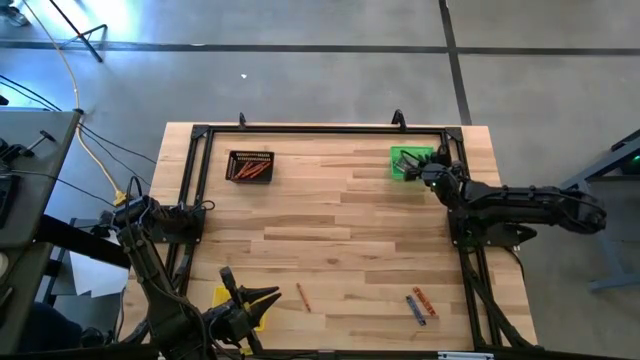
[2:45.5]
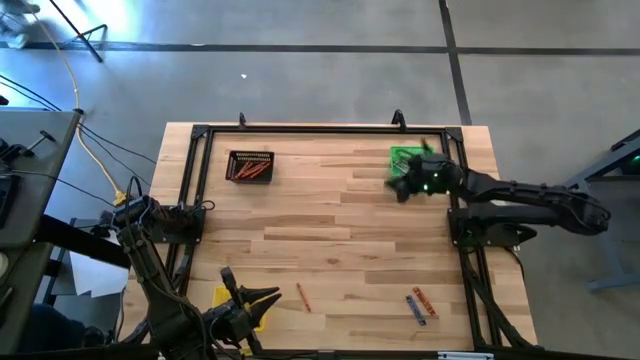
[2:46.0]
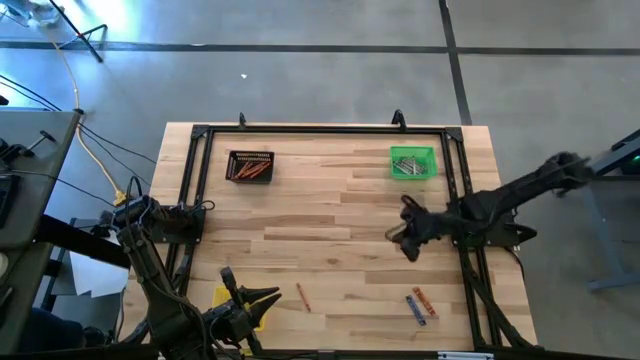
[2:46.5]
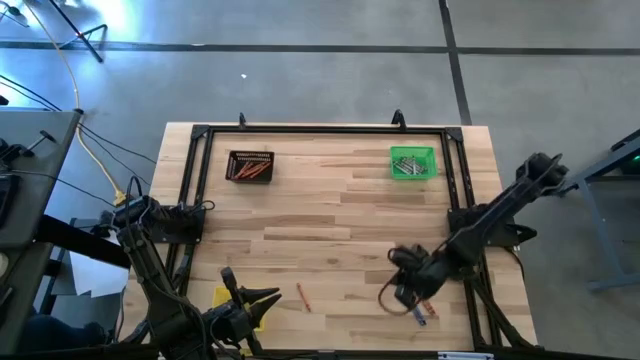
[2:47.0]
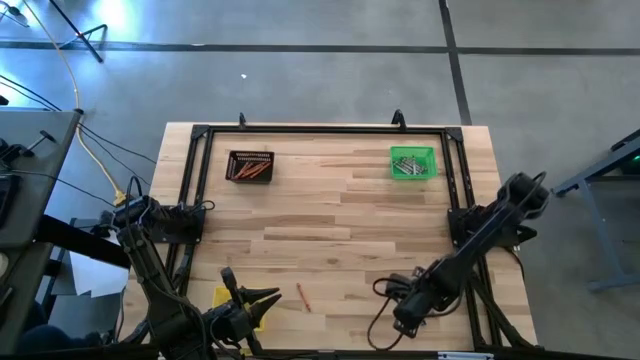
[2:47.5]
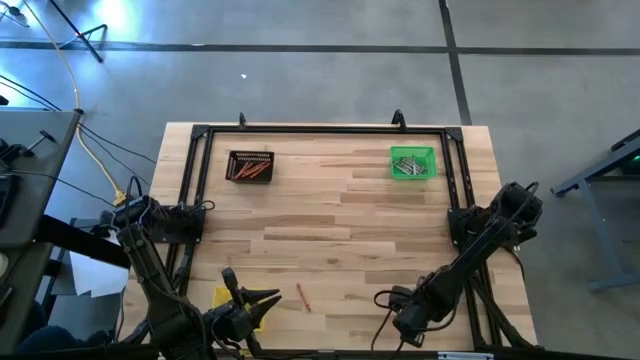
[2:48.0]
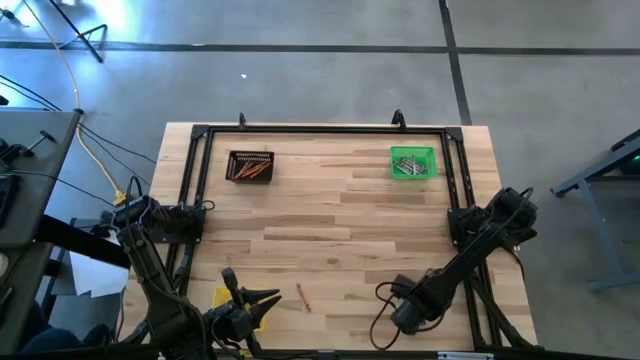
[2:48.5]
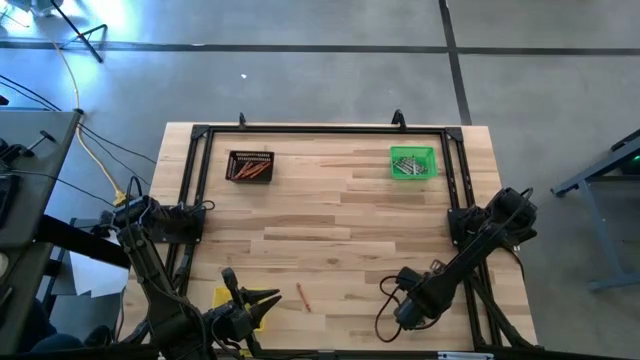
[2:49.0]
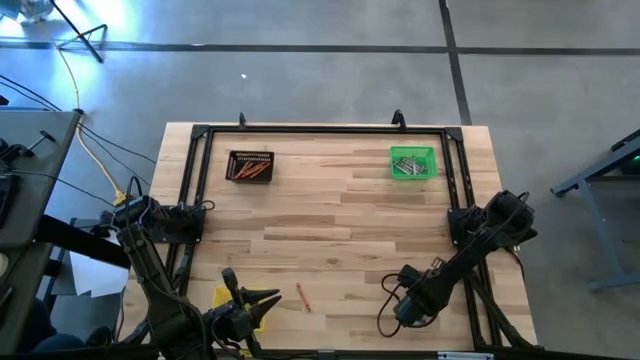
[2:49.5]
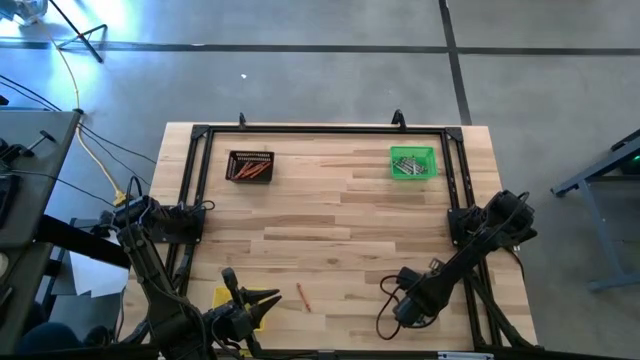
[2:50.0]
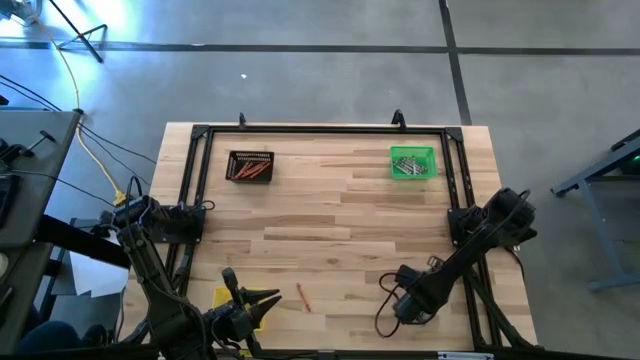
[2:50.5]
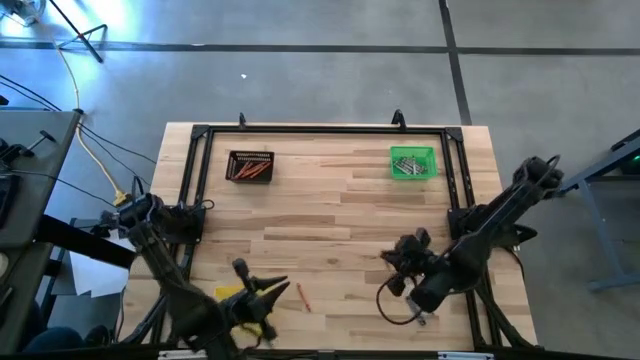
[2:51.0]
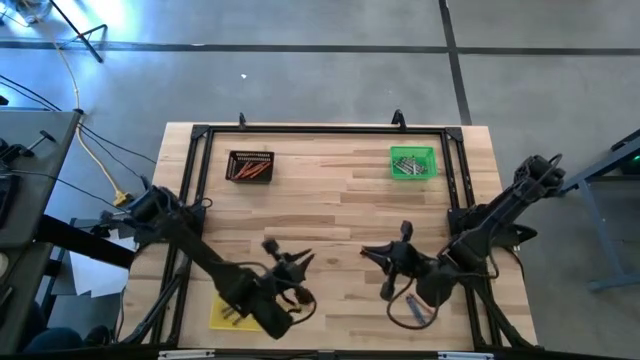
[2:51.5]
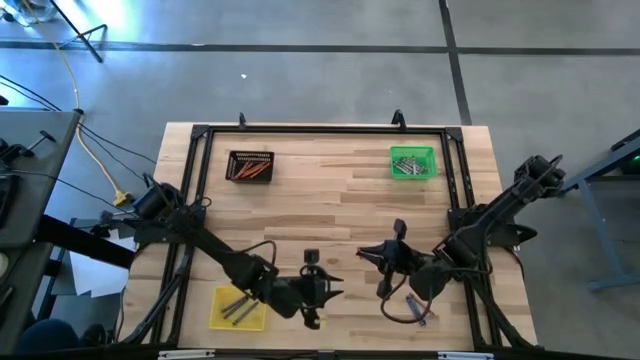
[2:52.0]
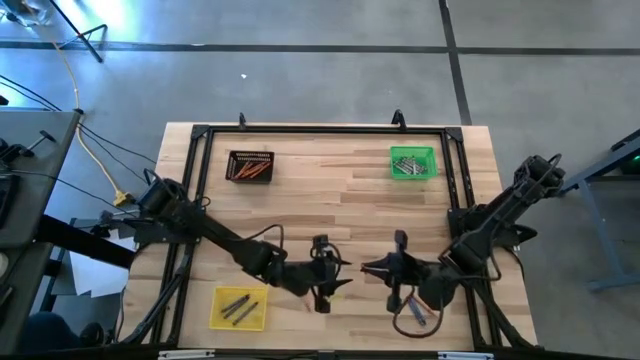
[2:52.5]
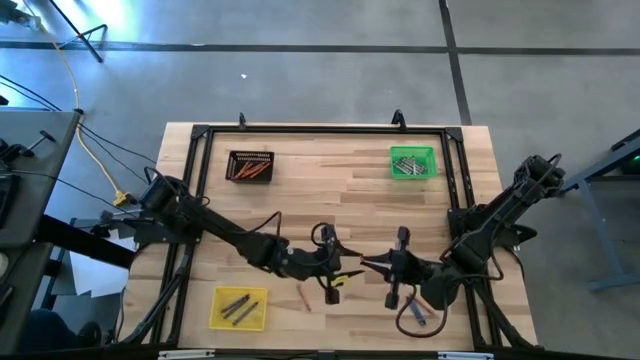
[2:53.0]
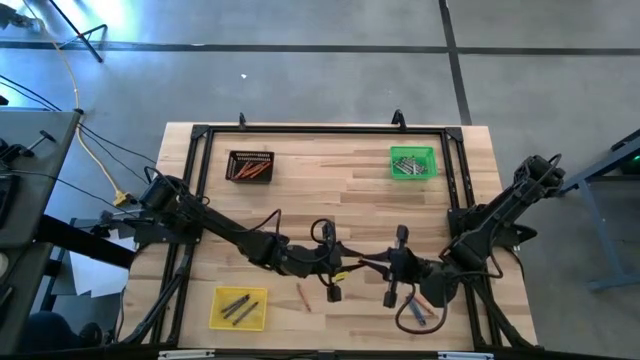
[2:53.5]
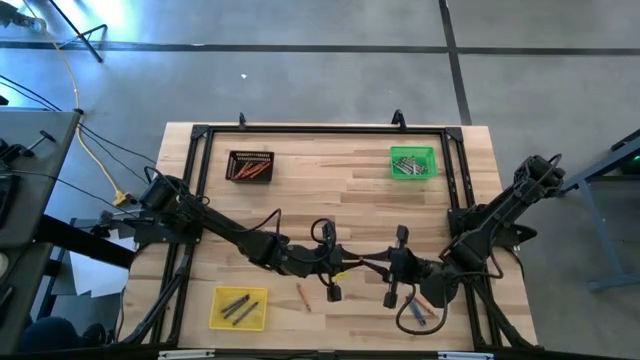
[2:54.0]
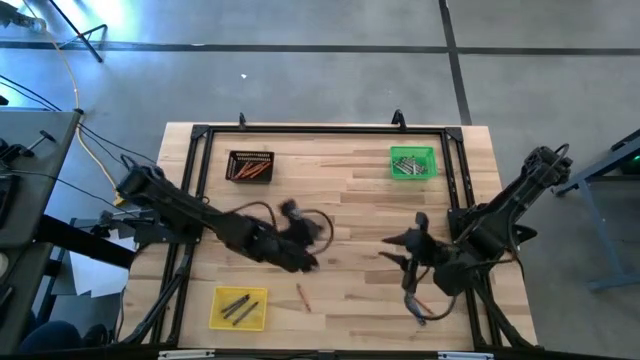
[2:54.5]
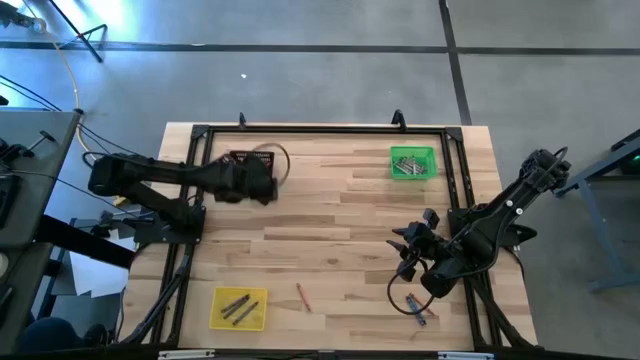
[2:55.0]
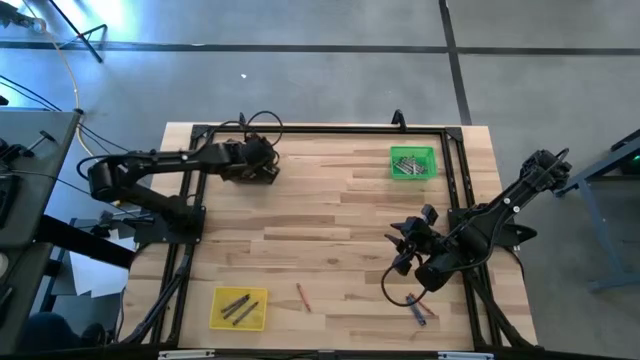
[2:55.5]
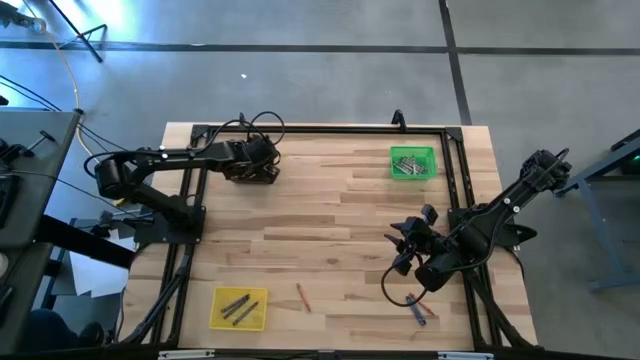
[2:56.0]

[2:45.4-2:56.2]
Task: Sort crayons
Put the orange crayon into the black bin

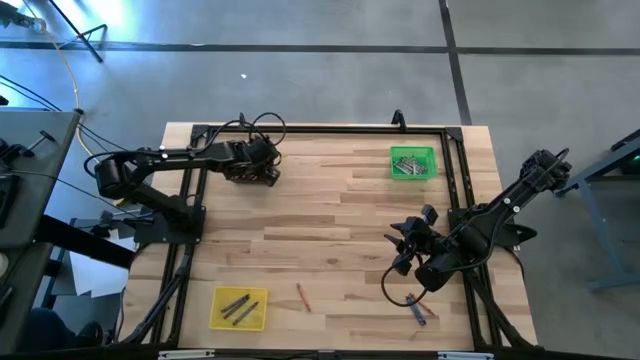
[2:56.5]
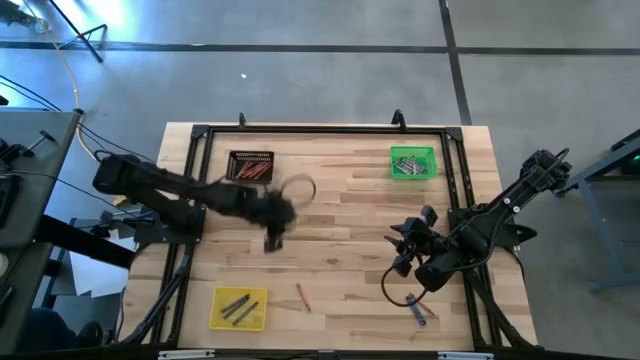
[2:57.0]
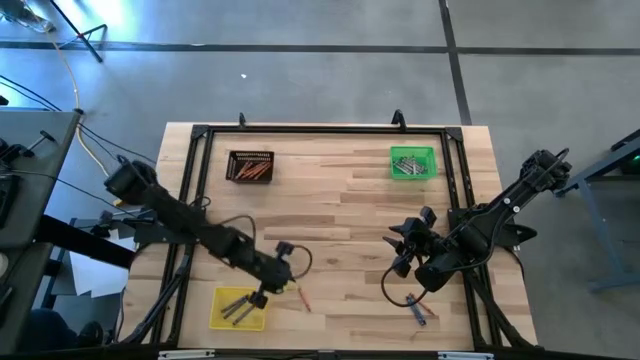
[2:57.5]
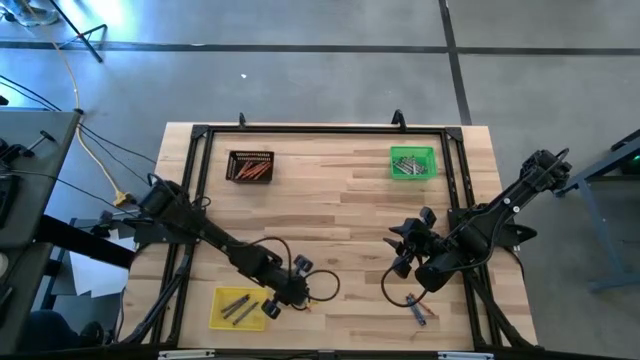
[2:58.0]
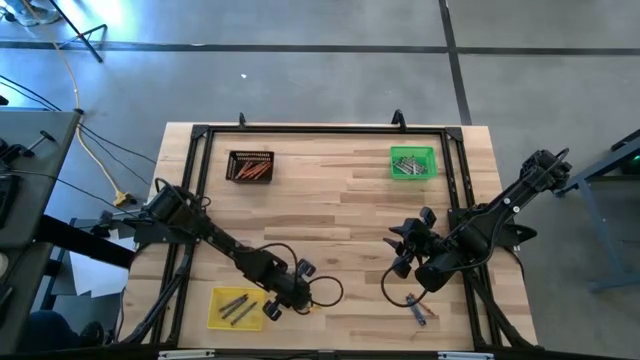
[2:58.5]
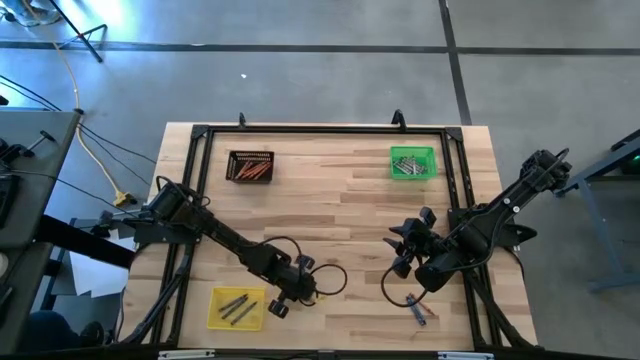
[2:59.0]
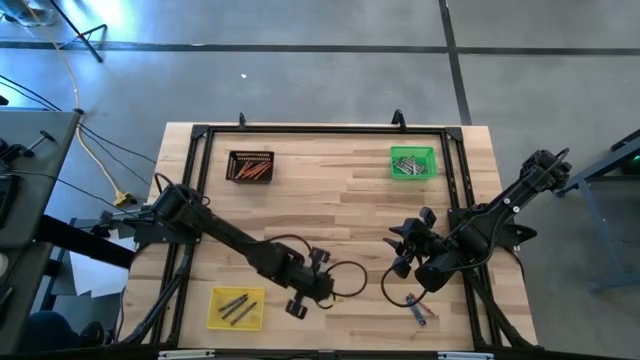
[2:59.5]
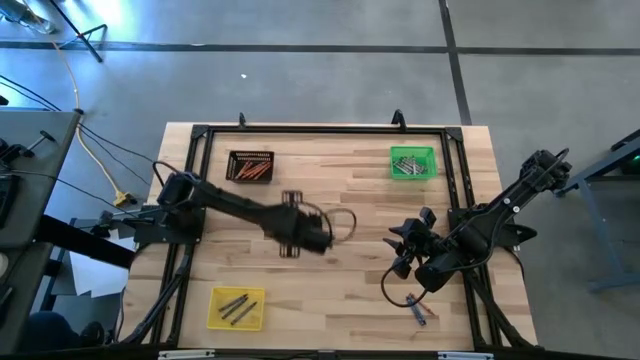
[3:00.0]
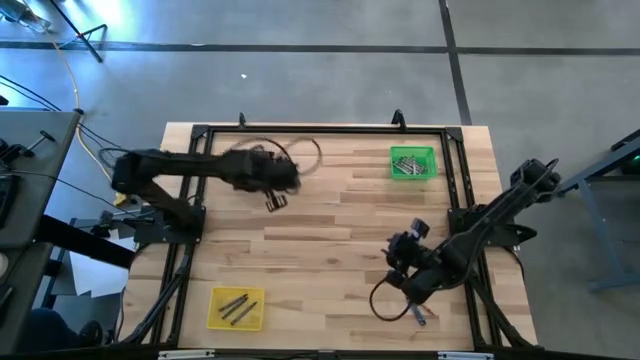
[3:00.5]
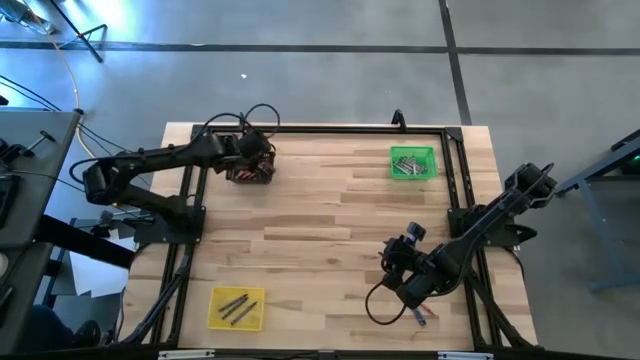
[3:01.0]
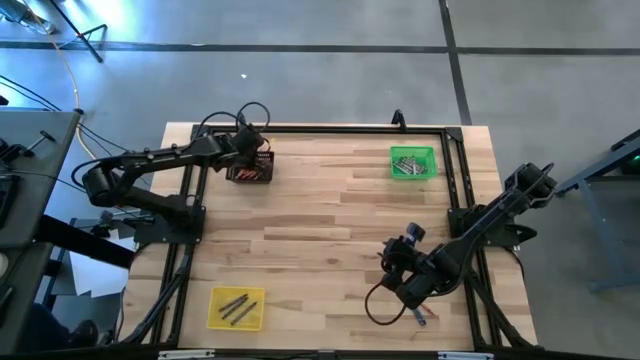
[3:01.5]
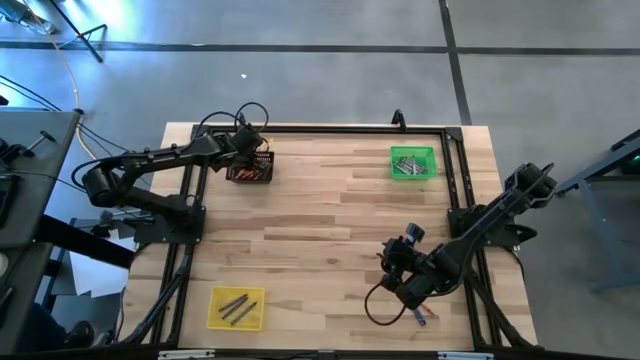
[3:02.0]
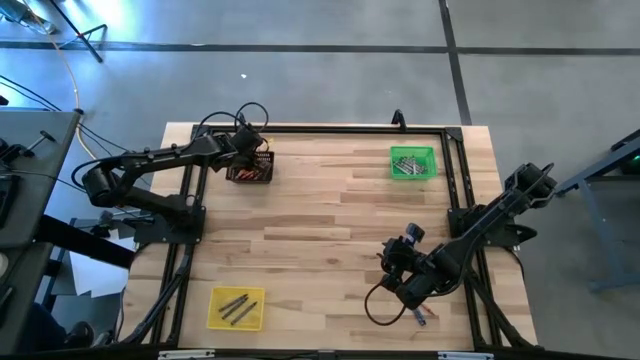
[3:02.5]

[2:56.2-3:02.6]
Put the orange crayon into the black bin

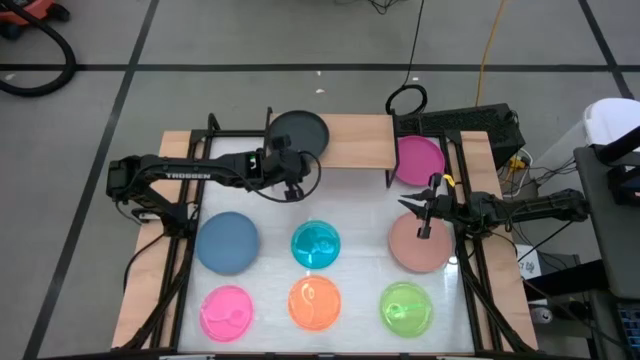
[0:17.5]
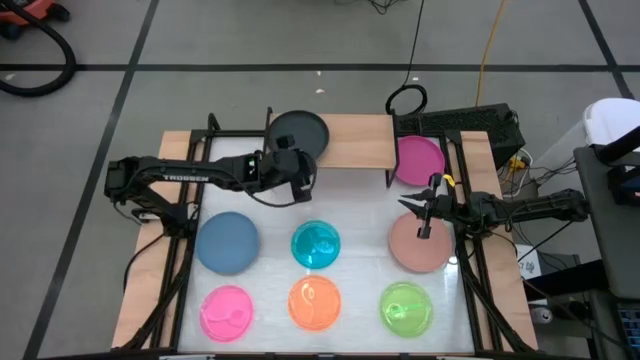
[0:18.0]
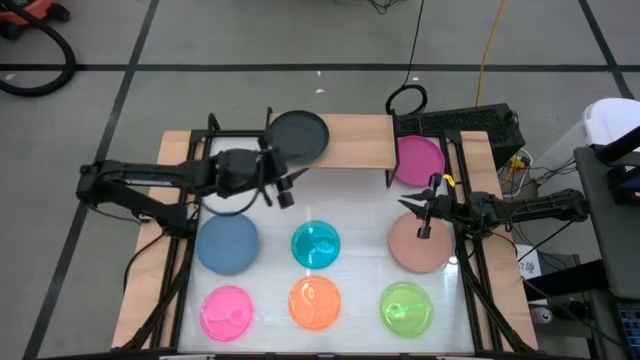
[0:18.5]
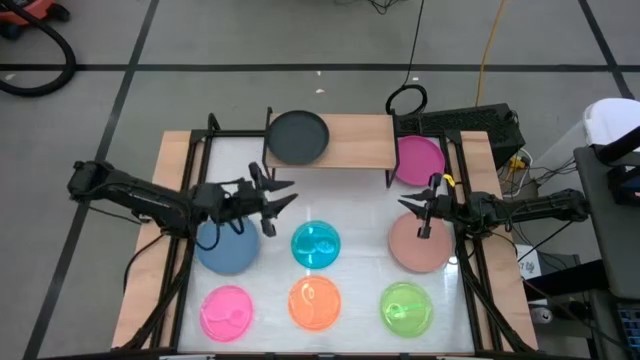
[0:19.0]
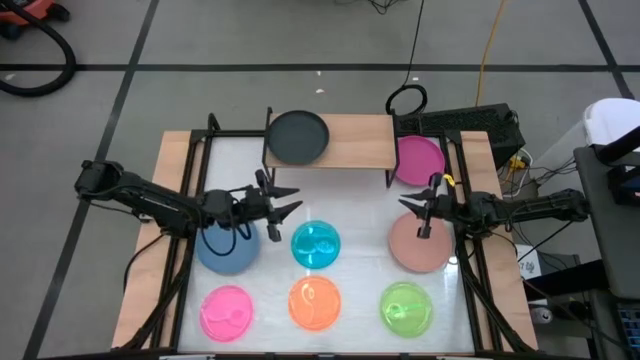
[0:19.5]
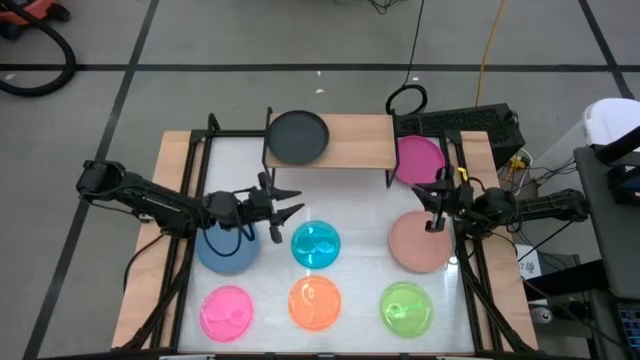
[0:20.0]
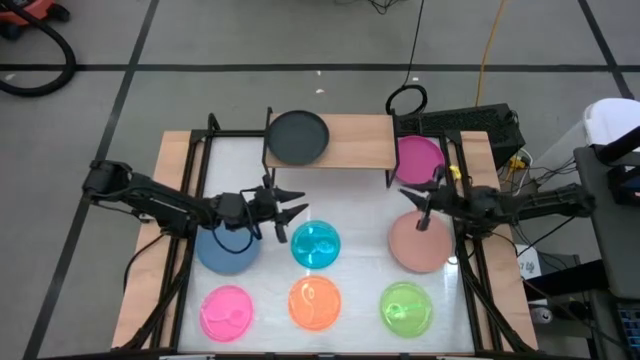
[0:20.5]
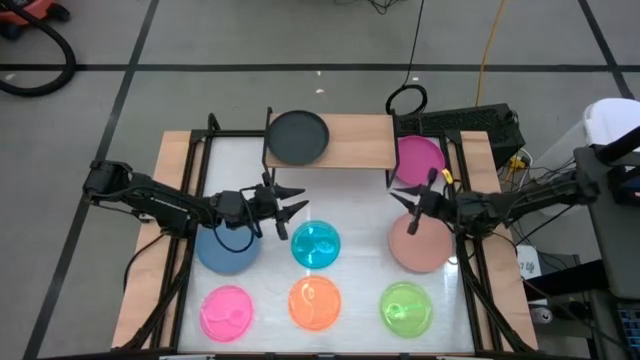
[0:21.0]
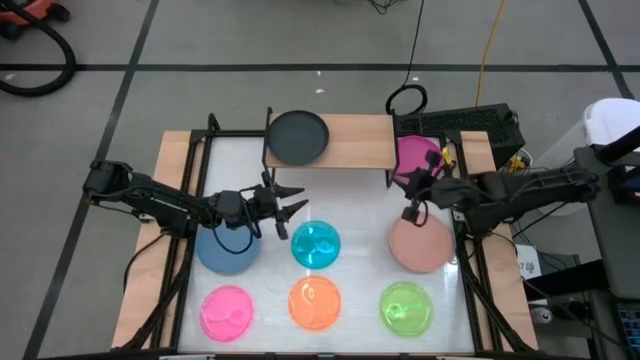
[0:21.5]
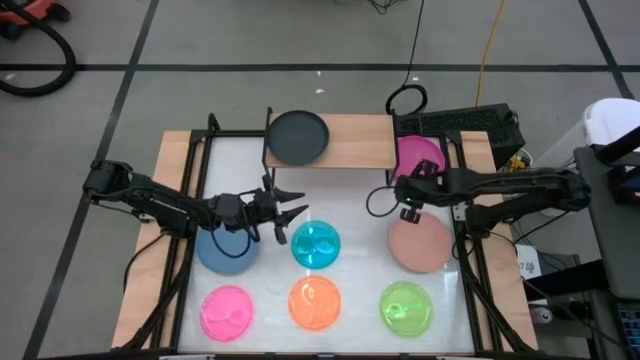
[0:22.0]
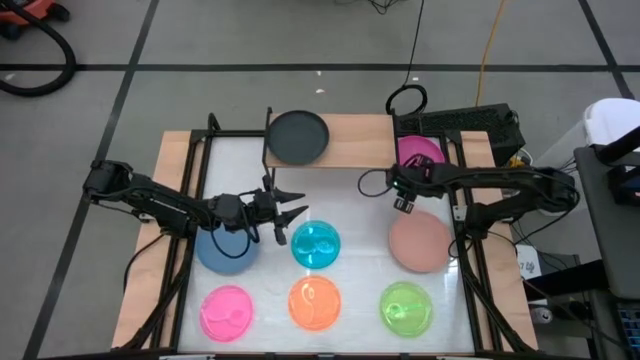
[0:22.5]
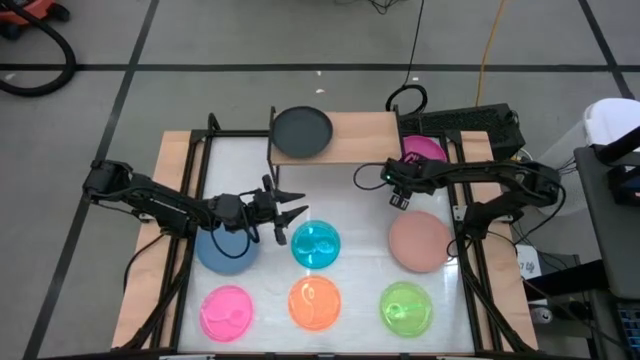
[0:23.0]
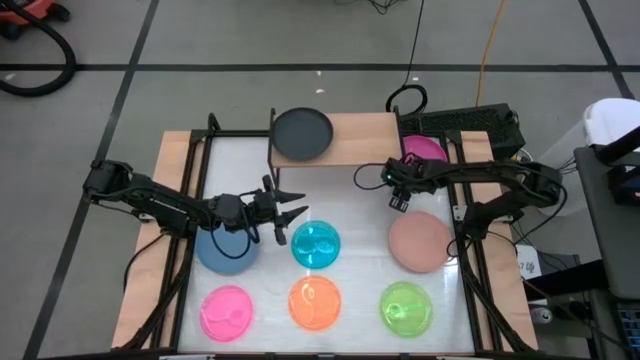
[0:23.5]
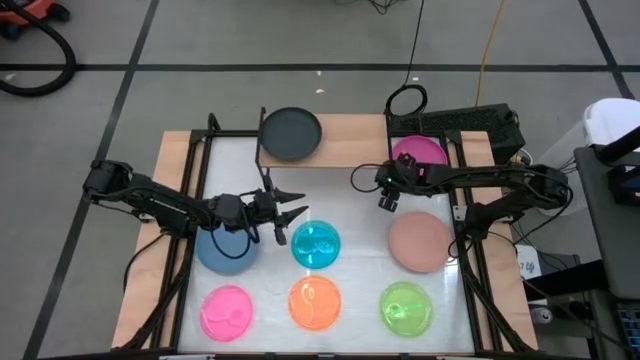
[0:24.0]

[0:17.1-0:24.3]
Task: Place and stack plates onto a shelf
Adjust the shelf
